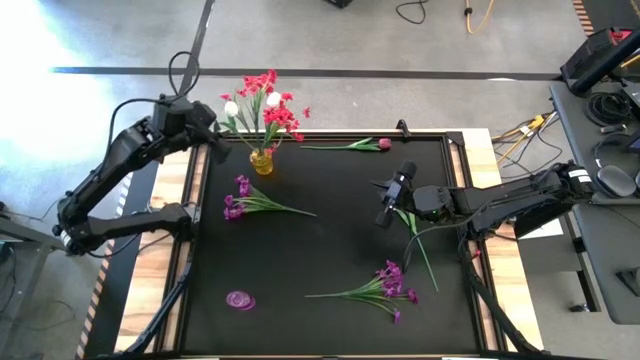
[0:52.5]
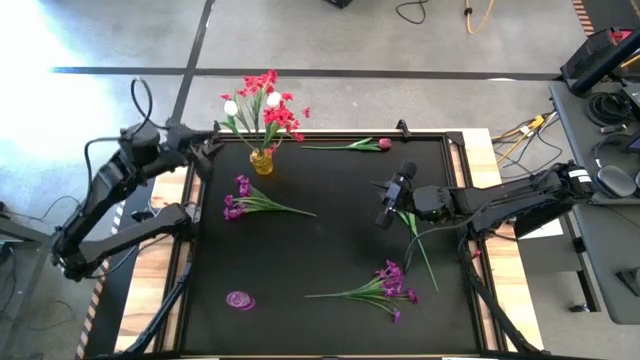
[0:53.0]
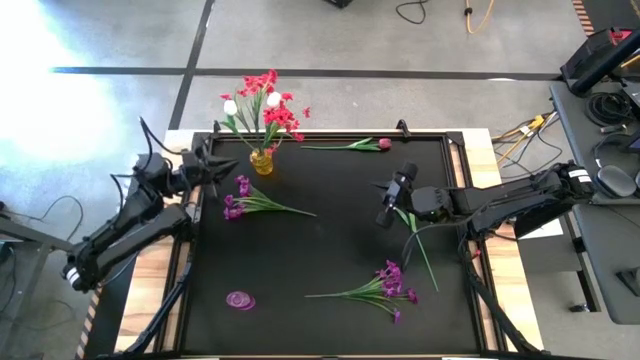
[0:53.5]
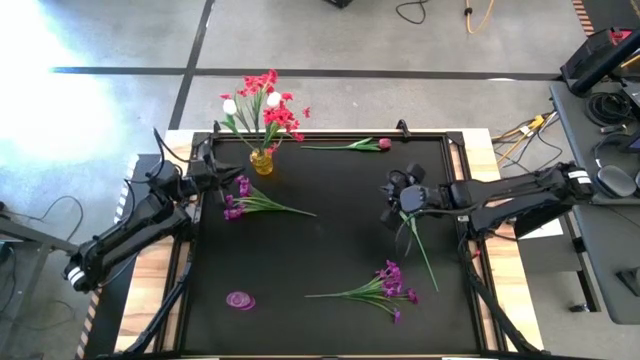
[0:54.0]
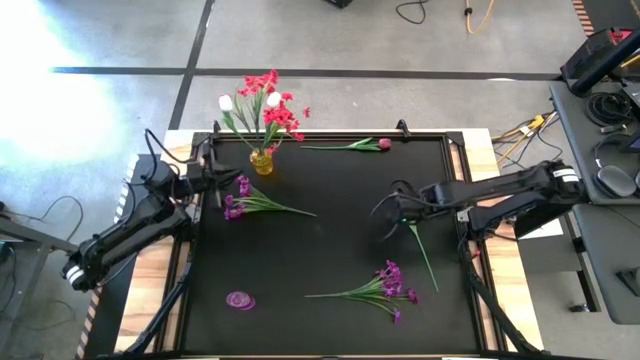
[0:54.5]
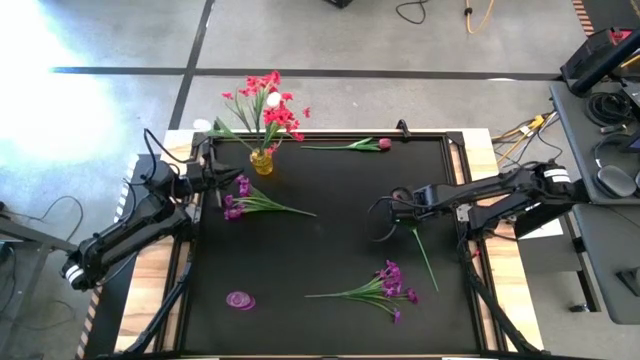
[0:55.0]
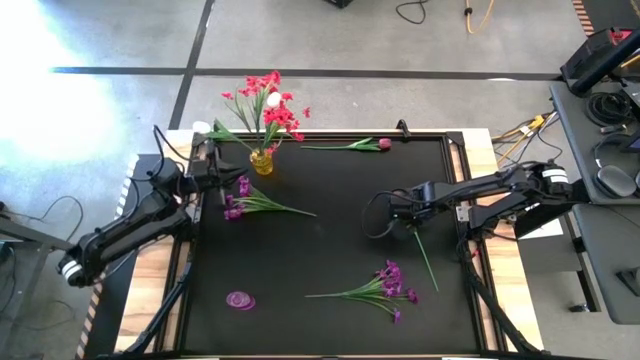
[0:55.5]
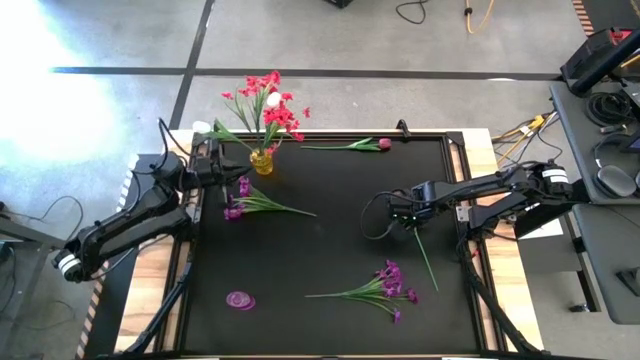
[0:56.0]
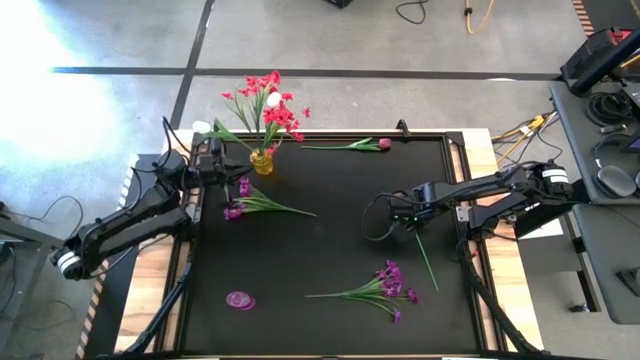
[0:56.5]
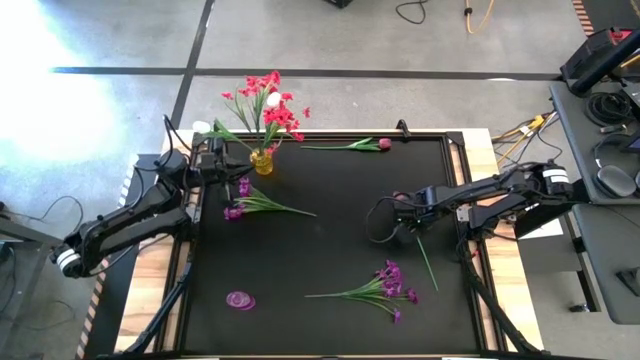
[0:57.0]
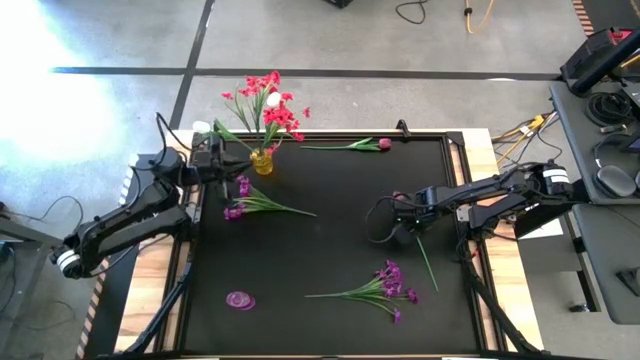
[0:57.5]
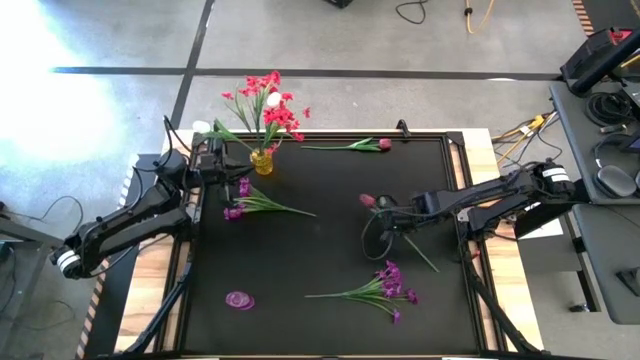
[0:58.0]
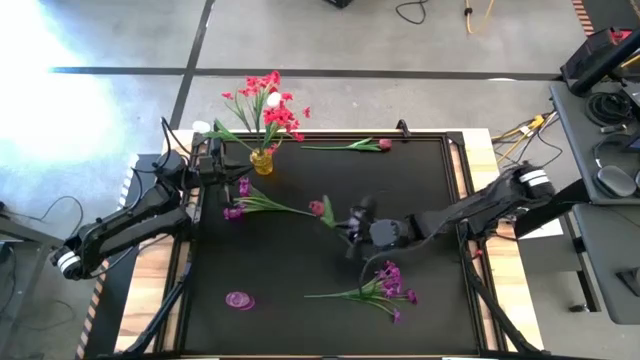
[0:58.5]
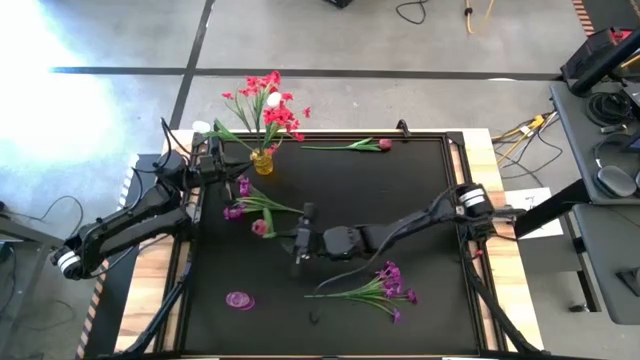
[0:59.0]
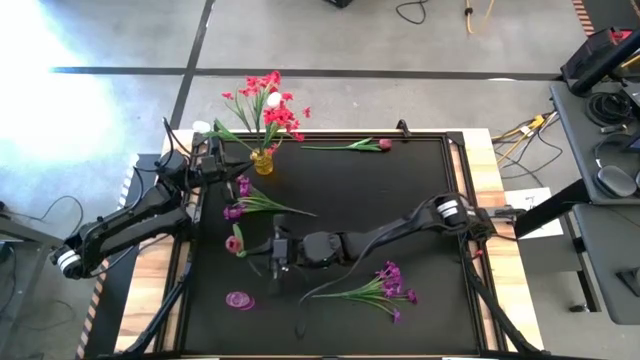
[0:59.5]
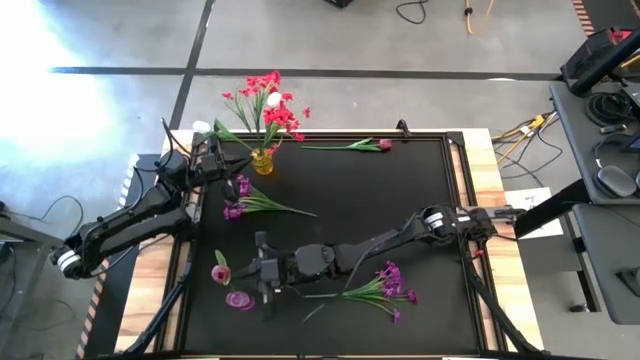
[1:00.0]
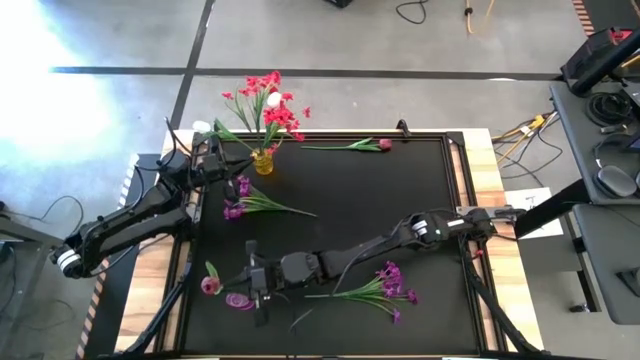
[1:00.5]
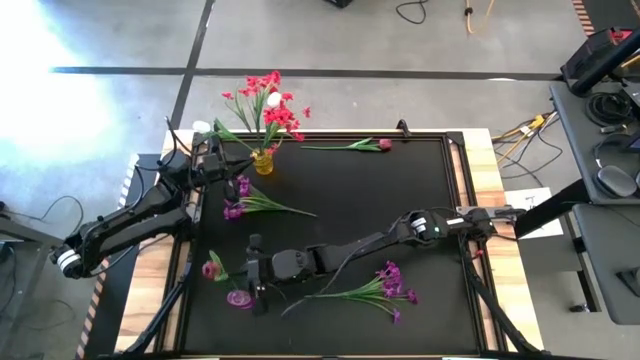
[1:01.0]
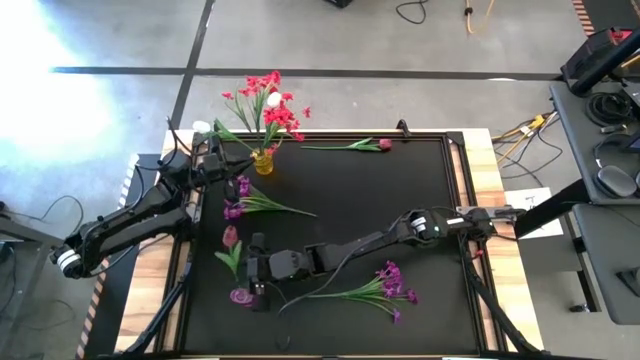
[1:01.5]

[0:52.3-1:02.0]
Task: Sort flowers into vase by color
Put the bottom red tulip into the violet vase

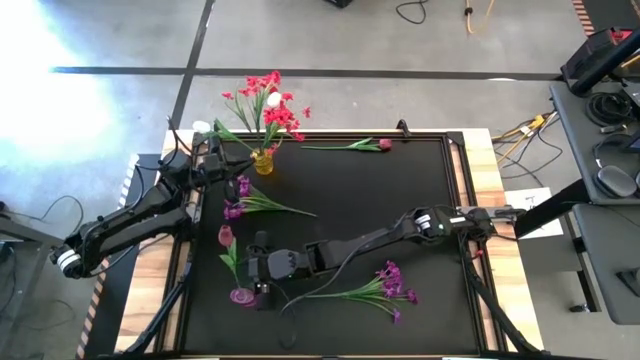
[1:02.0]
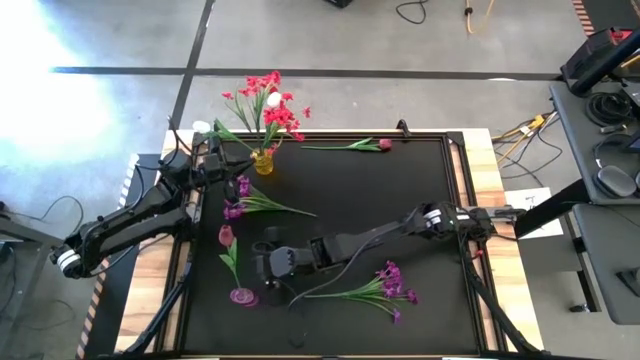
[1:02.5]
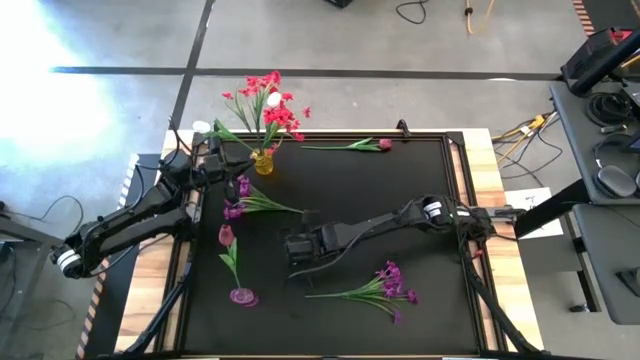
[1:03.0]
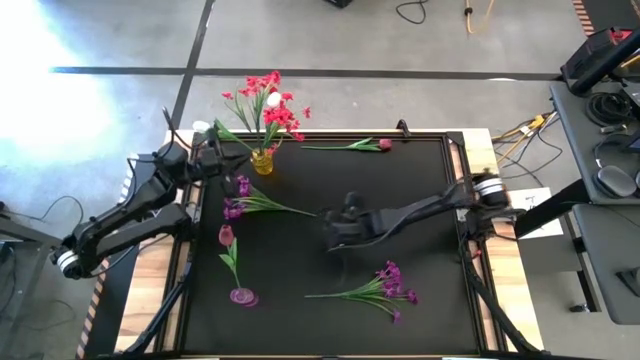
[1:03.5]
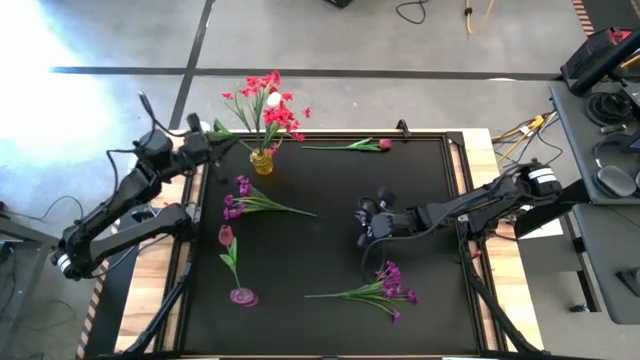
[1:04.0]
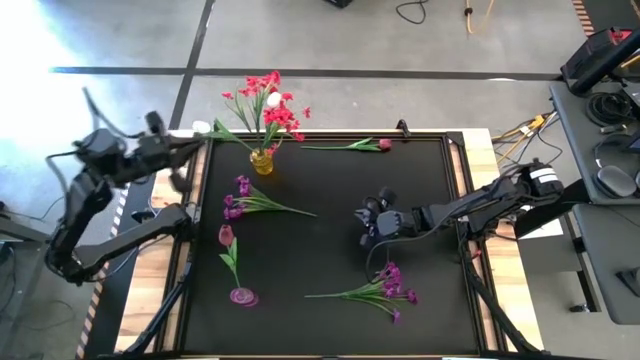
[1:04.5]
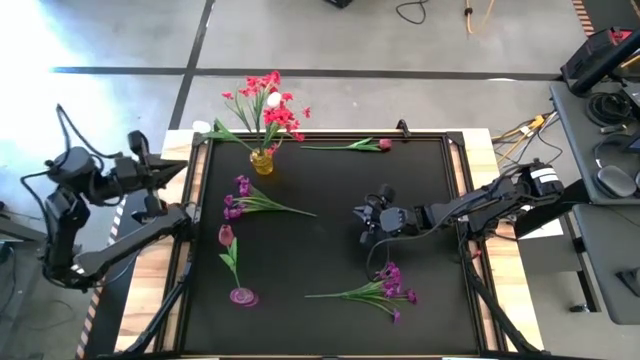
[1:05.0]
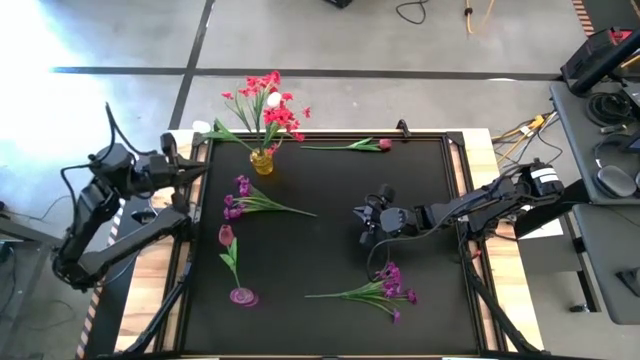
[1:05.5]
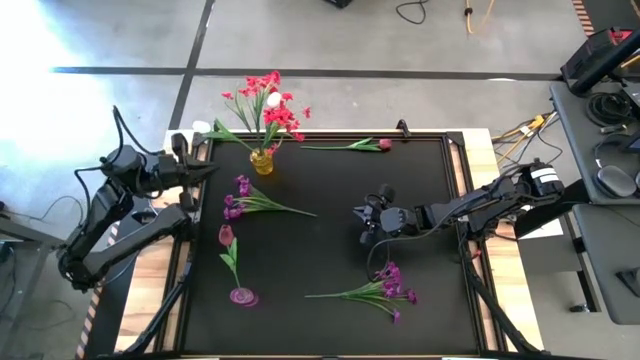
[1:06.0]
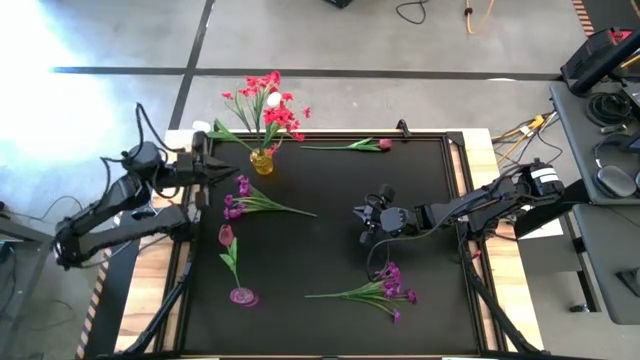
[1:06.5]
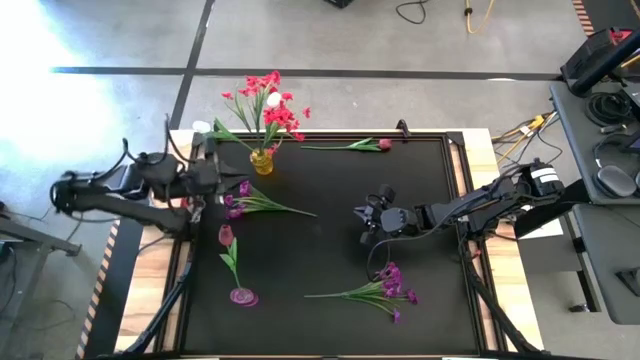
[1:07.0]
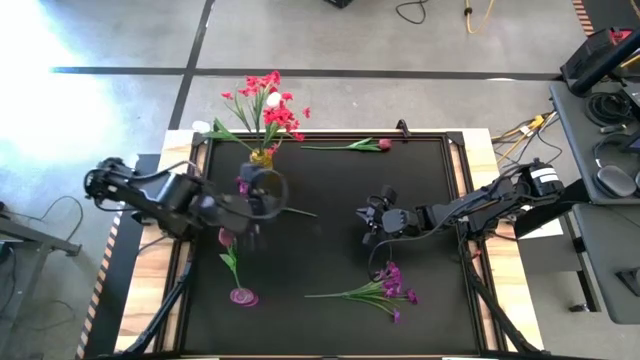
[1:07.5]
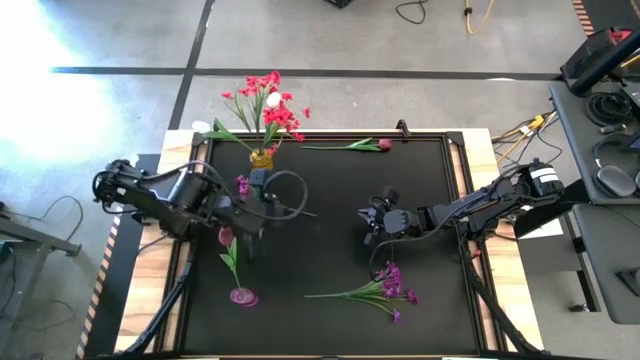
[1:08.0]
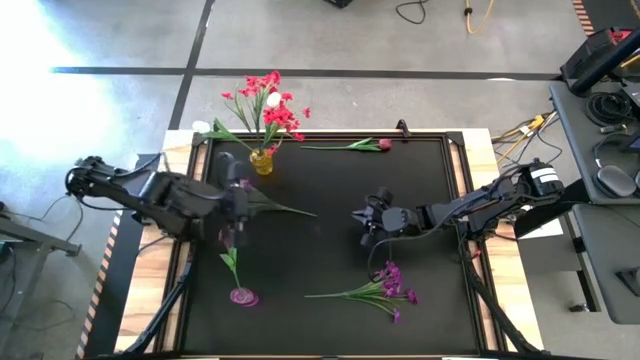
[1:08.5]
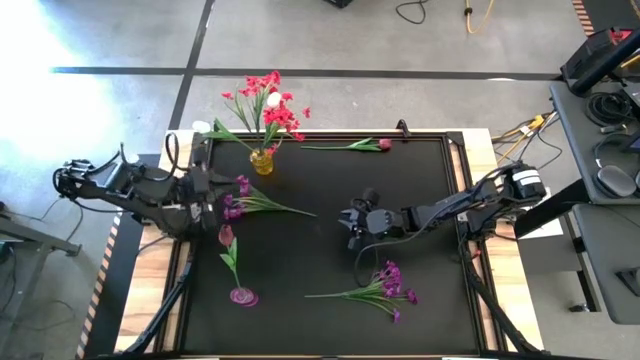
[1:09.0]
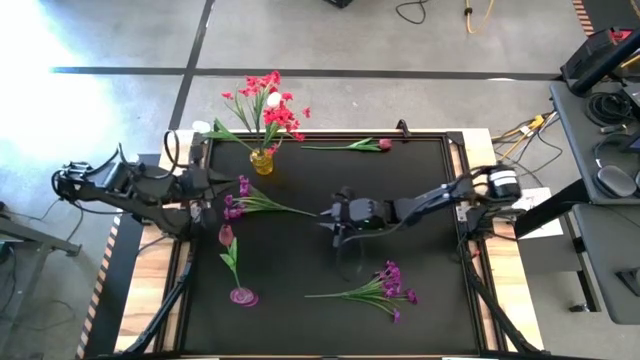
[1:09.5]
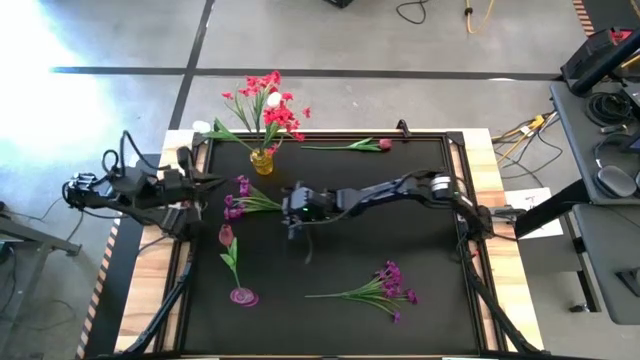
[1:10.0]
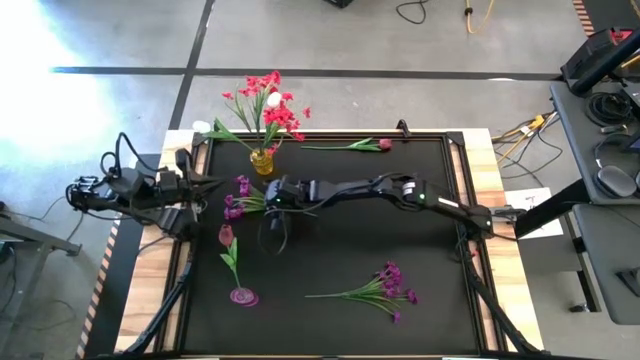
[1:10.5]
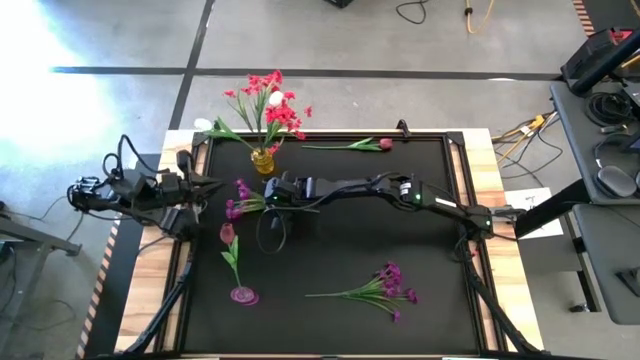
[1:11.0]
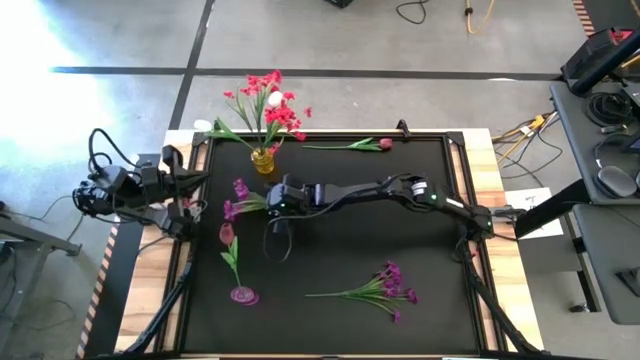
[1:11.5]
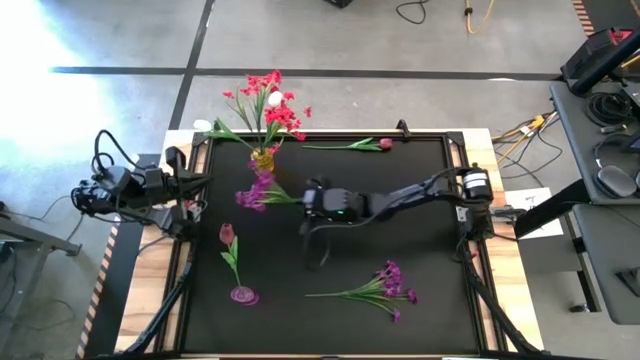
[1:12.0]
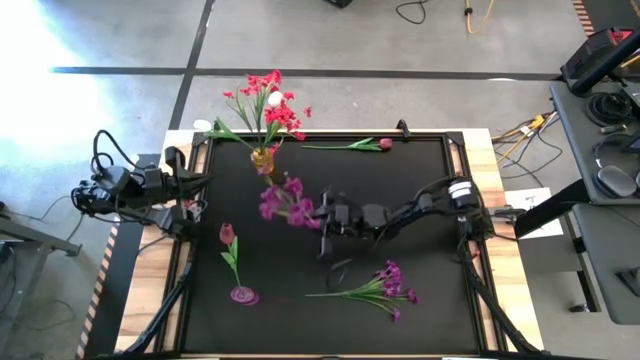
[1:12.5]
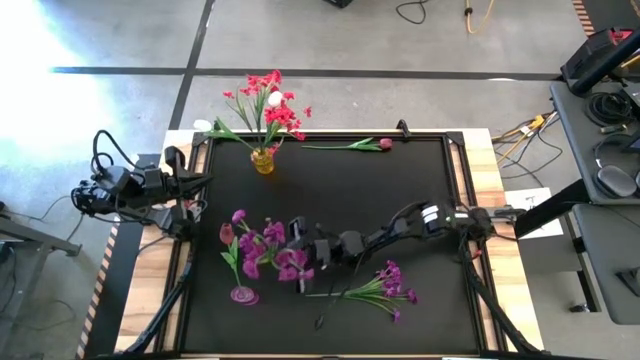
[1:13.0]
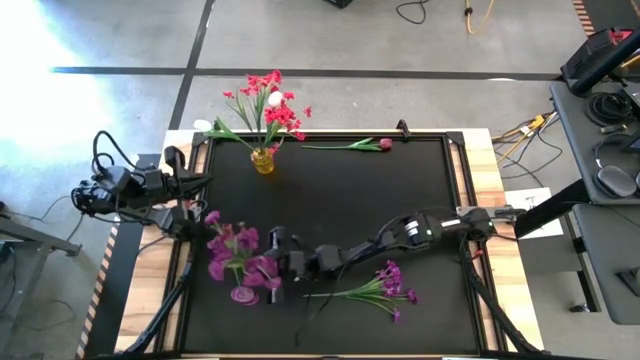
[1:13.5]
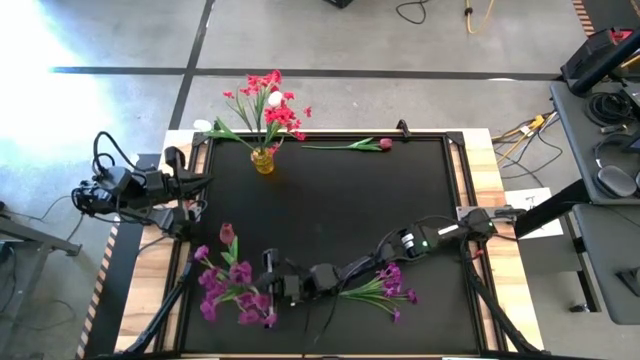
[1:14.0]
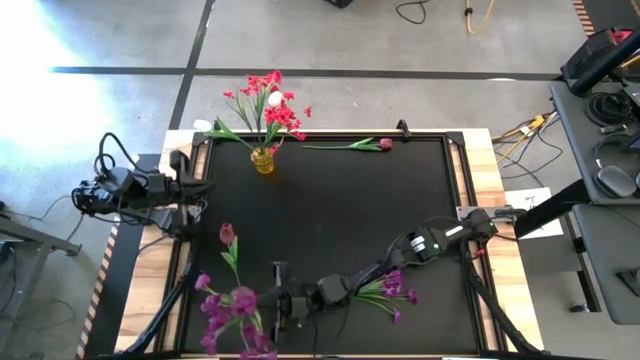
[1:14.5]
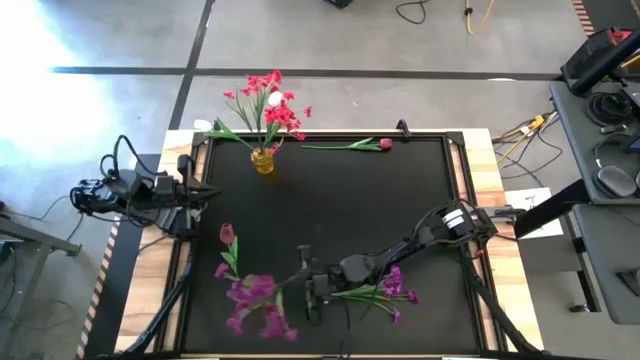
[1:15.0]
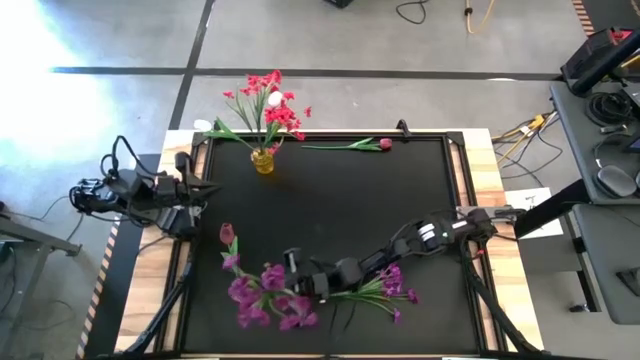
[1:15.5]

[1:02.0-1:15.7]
Put the top violet flowers into the violet vase
